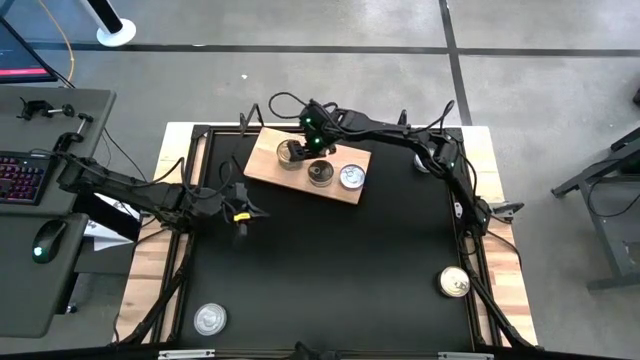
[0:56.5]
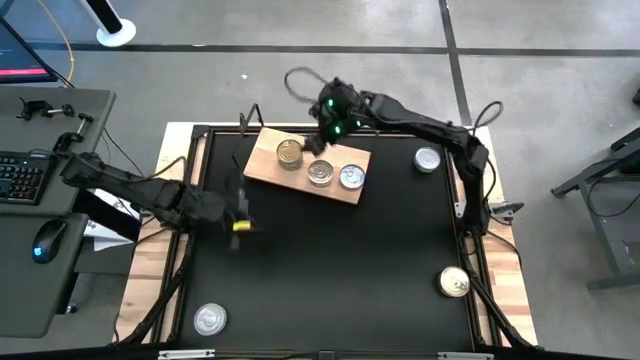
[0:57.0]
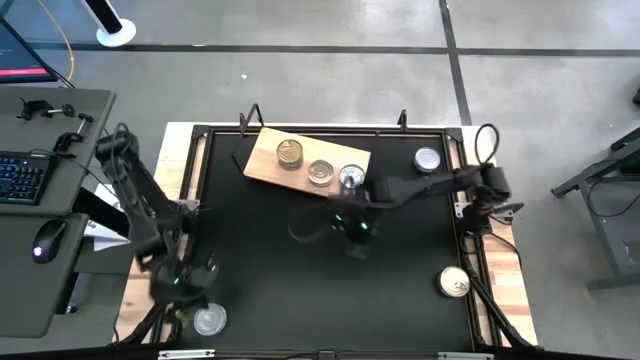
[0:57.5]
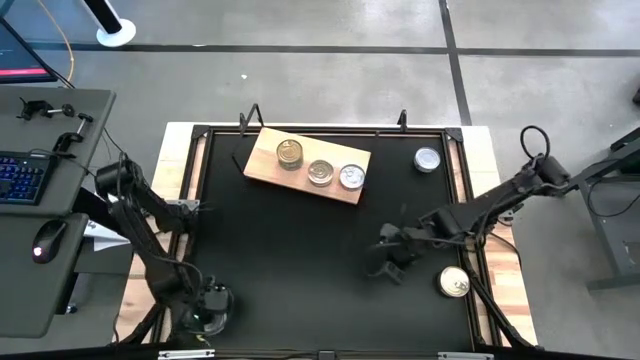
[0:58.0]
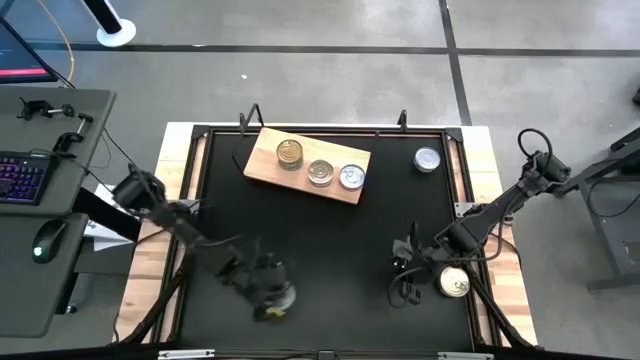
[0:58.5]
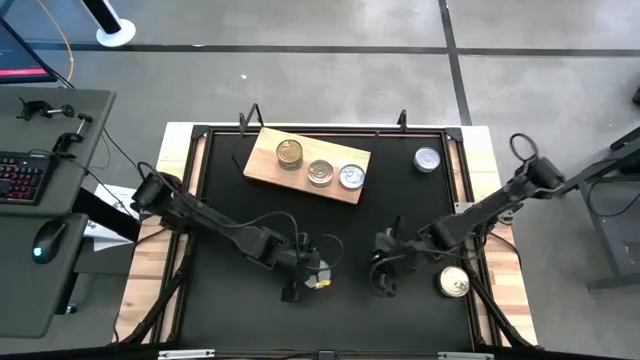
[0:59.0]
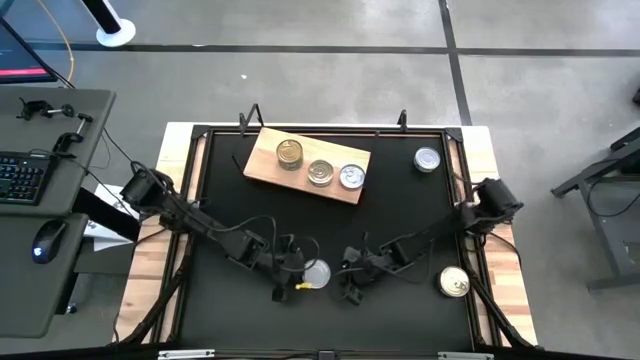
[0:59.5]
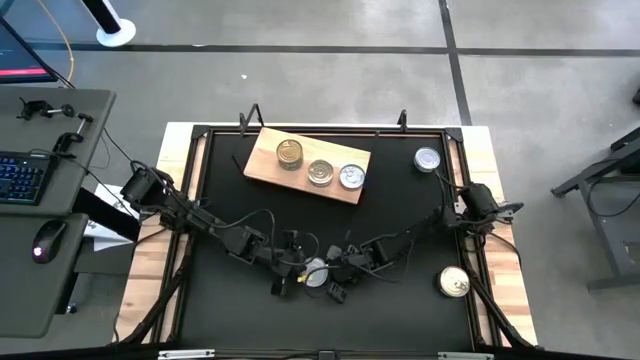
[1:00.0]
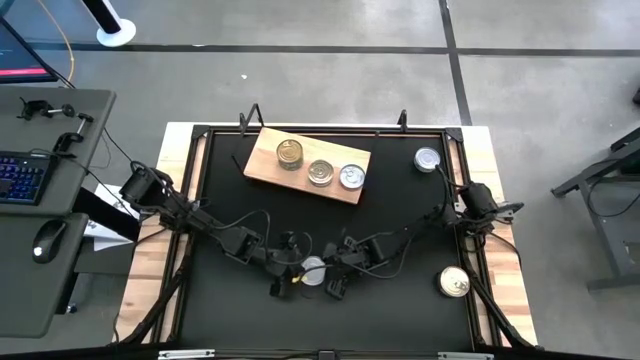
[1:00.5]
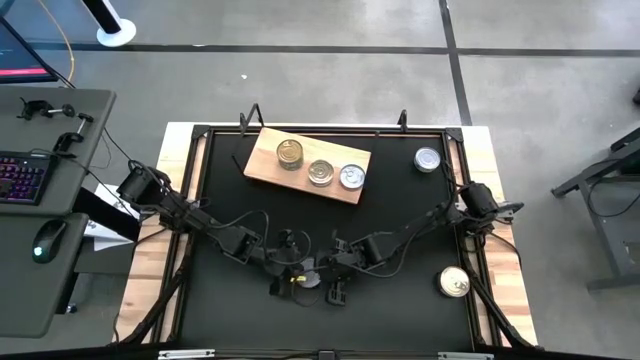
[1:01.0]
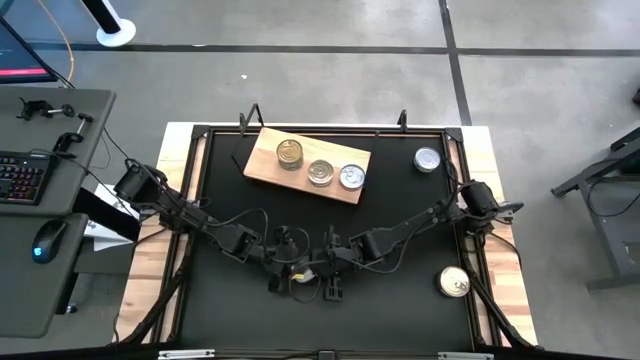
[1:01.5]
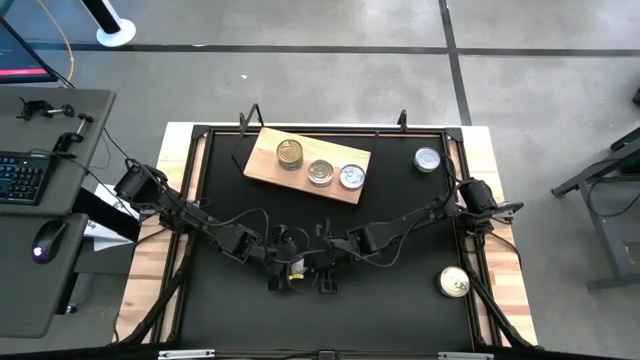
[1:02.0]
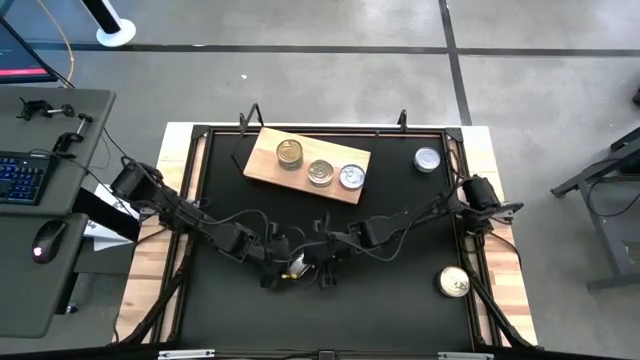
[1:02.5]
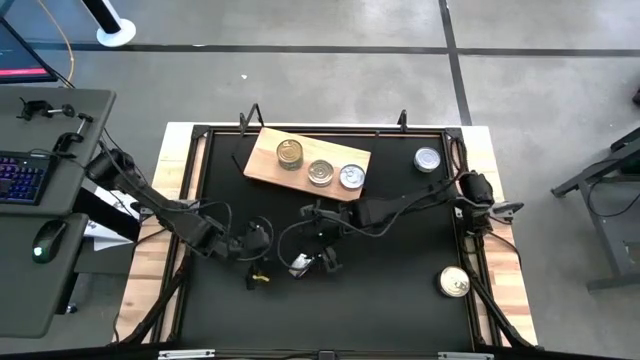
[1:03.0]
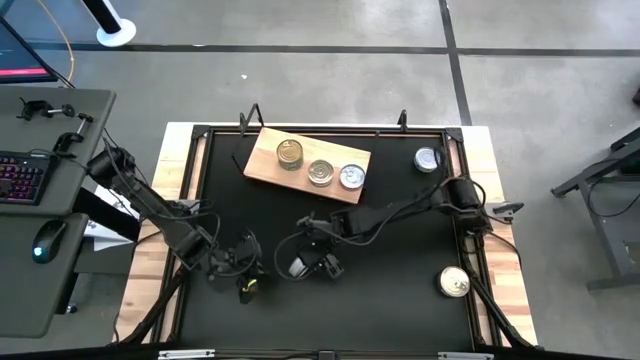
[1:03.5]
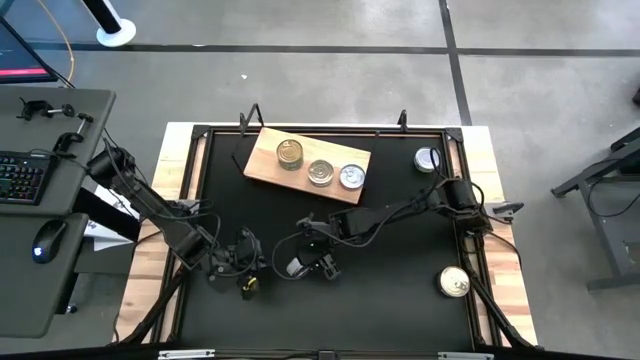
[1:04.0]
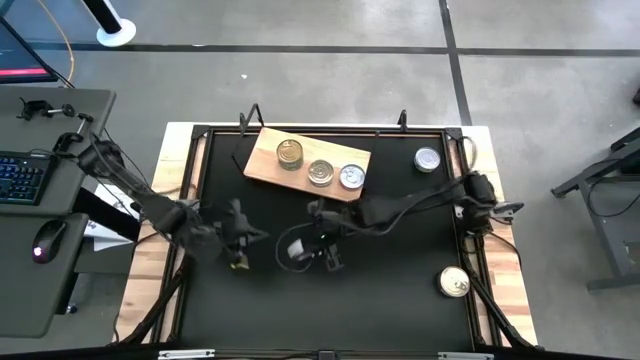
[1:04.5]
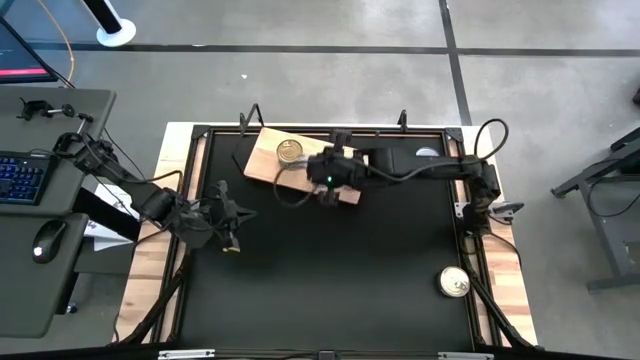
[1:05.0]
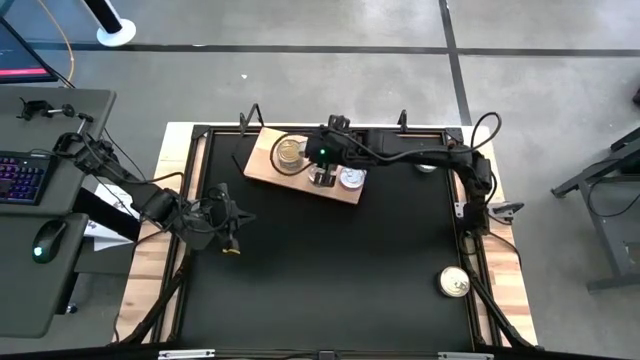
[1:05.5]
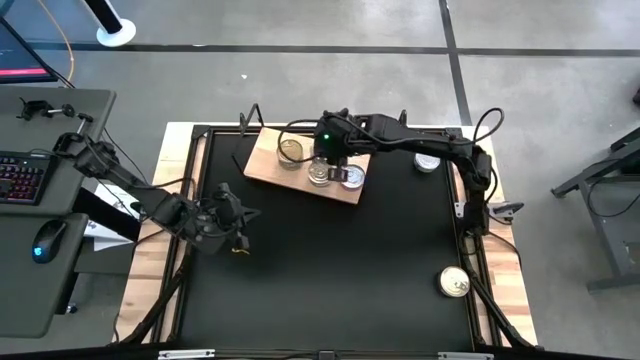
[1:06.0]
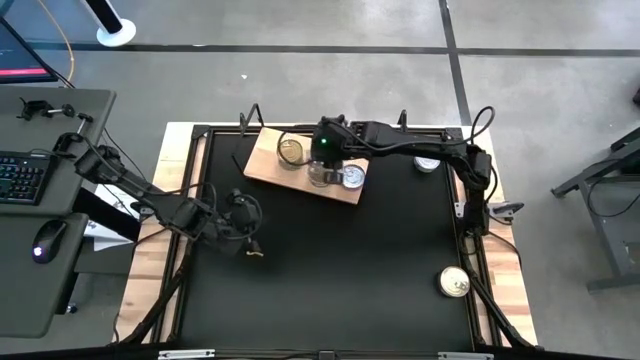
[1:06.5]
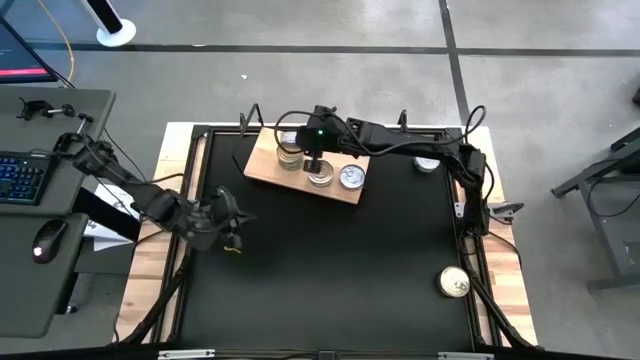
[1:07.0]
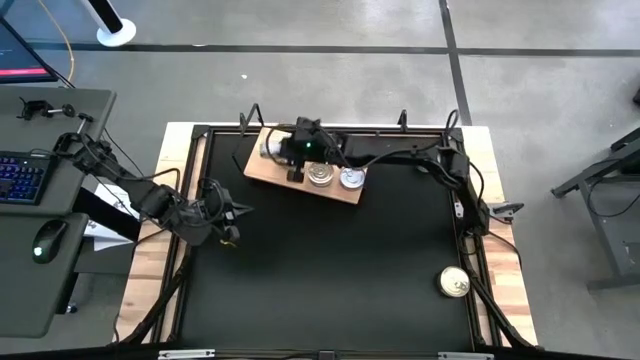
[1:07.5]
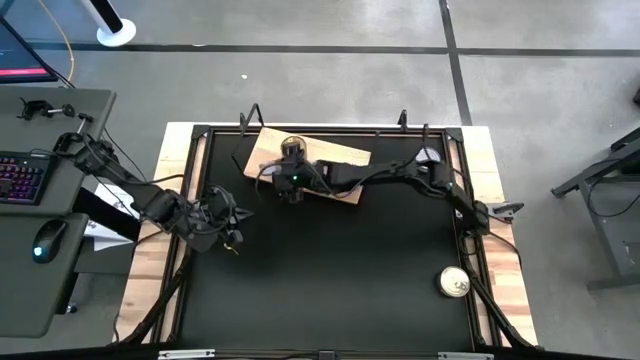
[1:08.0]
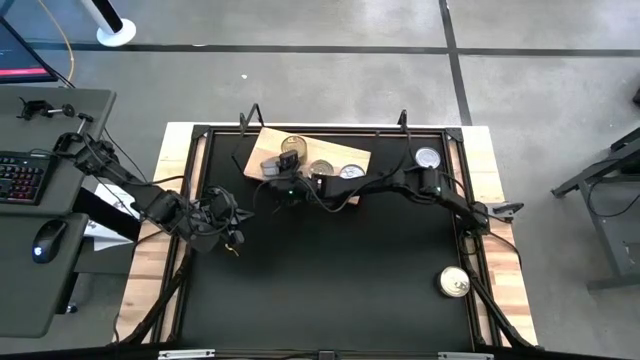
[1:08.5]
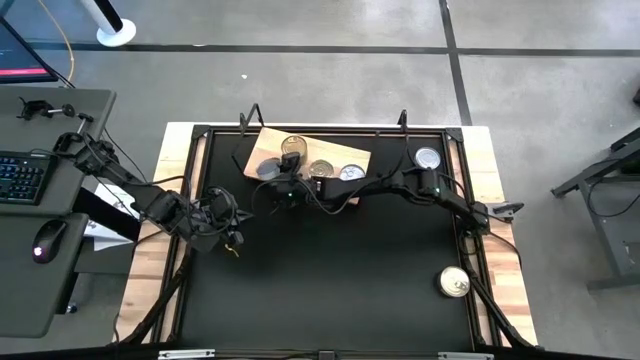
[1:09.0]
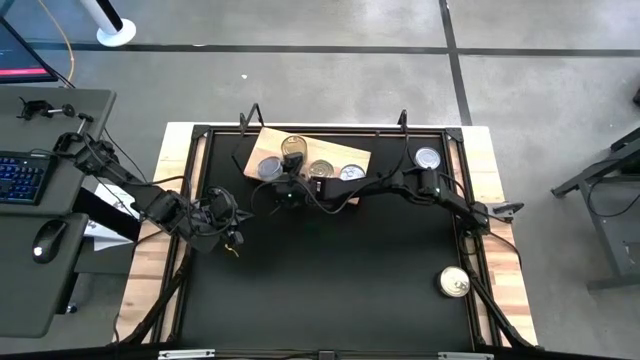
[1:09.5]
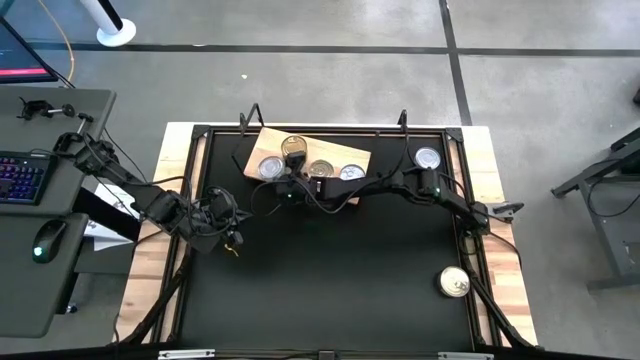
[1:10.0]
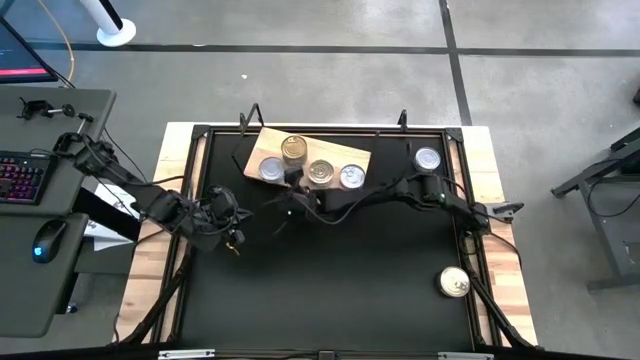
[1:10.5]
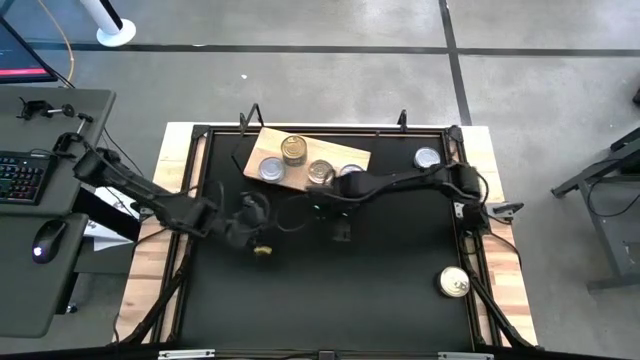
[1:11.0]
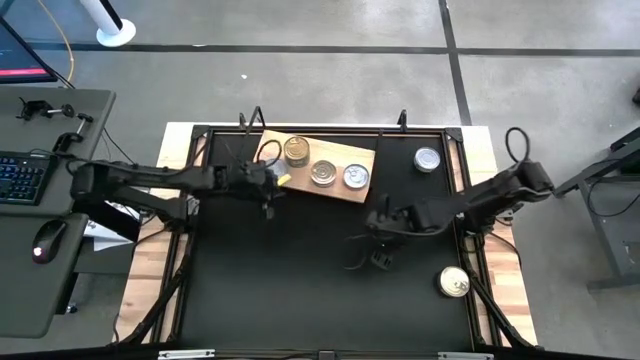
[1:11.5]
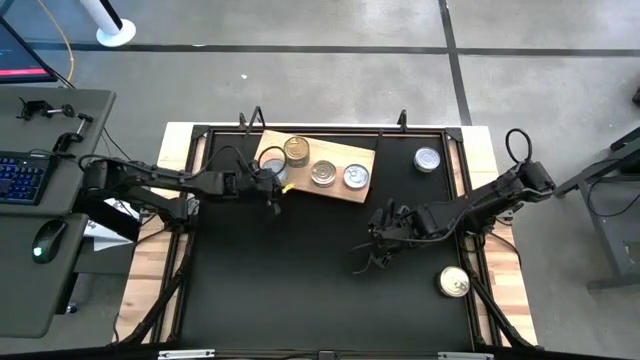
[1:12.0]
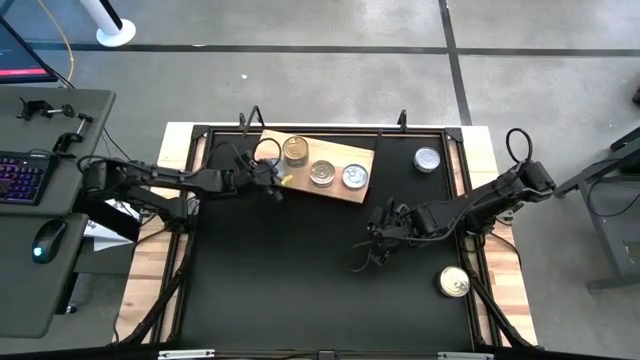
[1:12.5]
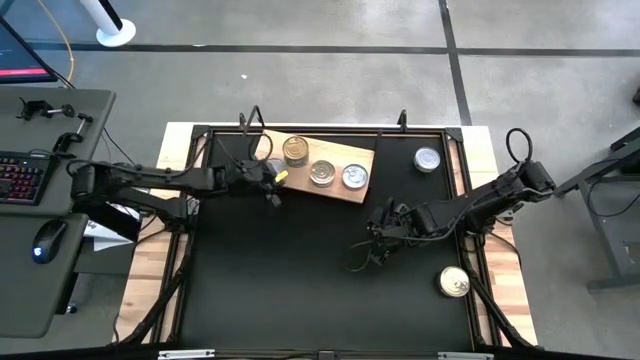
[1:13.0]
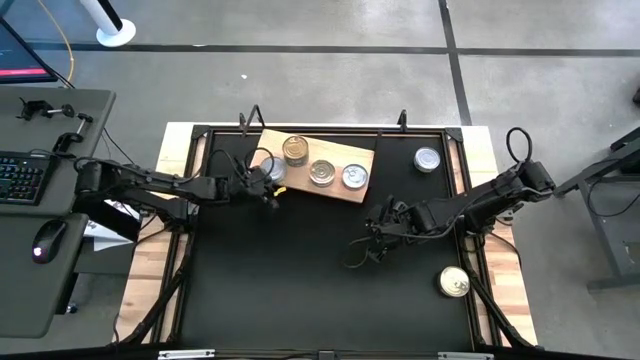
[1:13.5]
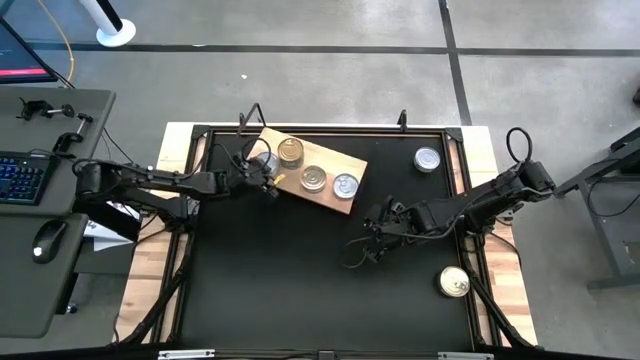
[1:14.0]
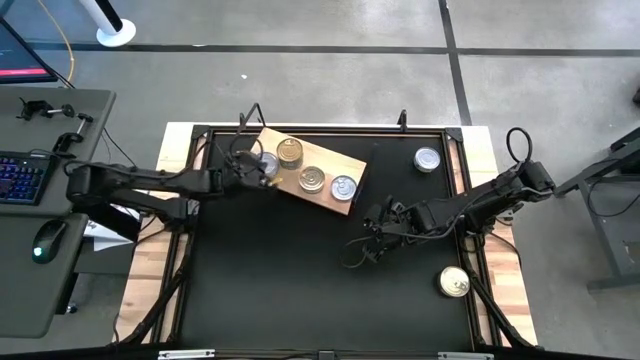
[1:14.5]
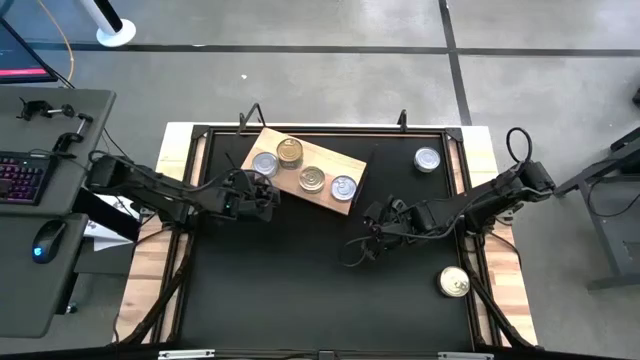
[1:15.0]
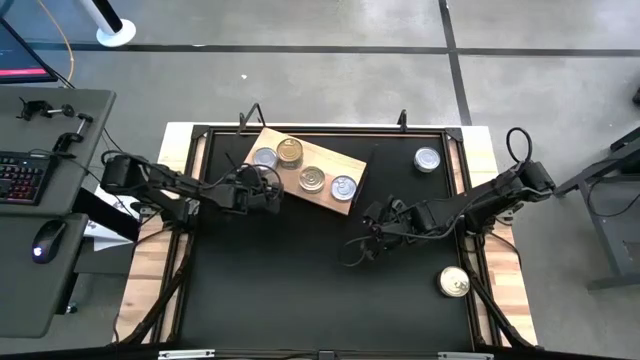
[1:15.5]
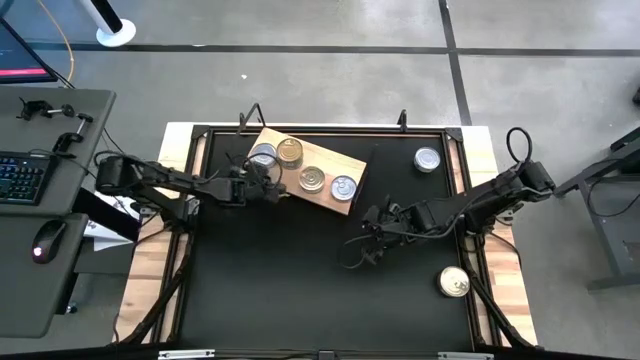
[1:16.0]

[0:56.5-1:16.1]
Task: Stack canned seafood by type on shelf
Put the bottom green tuna can on the shelf

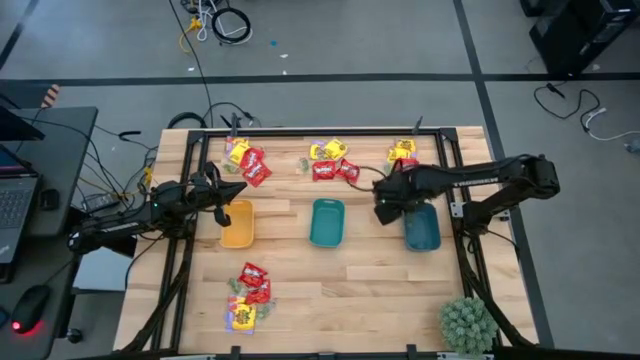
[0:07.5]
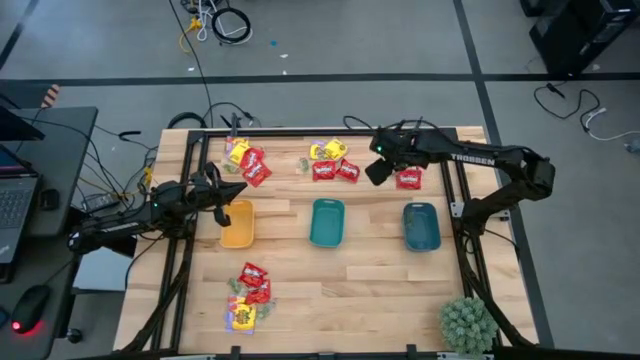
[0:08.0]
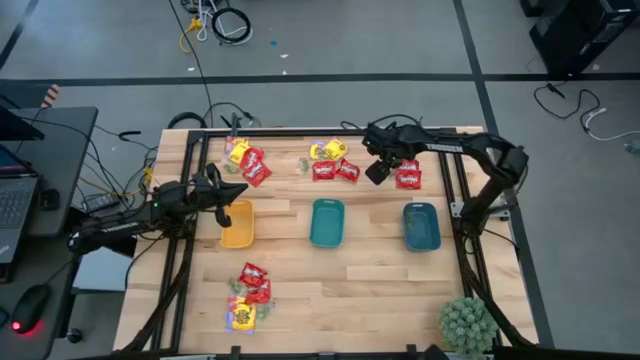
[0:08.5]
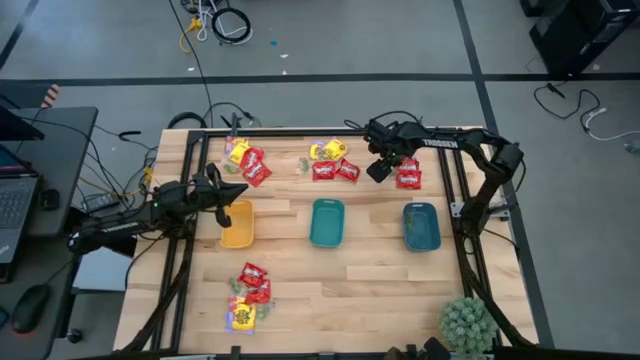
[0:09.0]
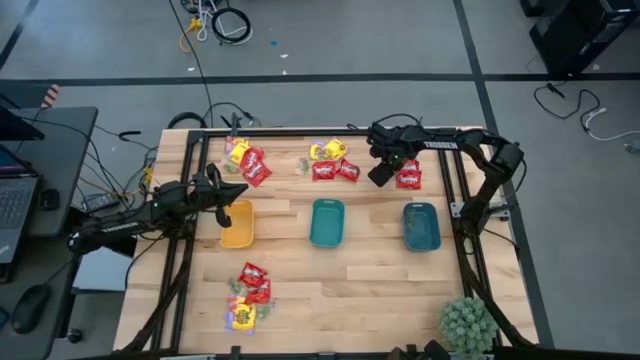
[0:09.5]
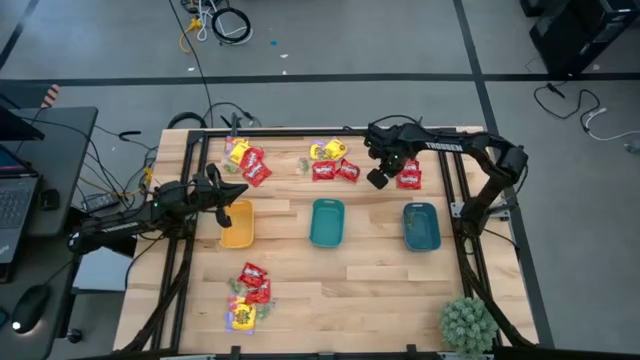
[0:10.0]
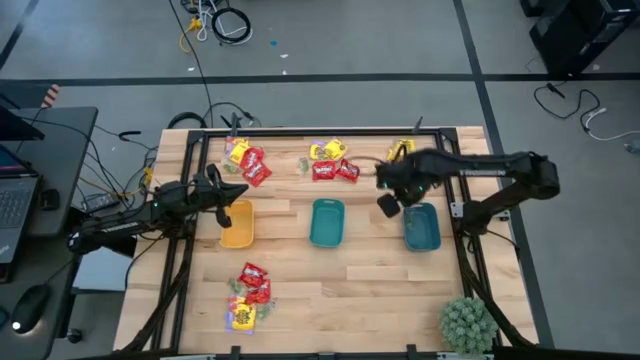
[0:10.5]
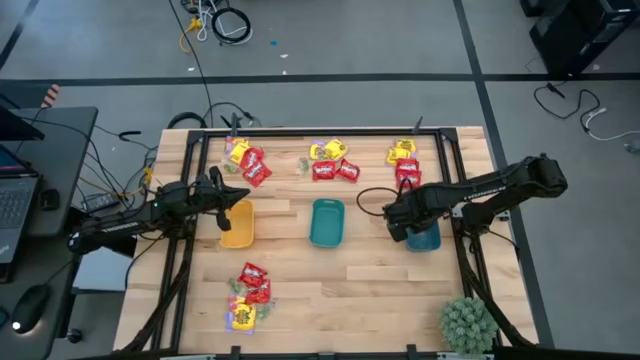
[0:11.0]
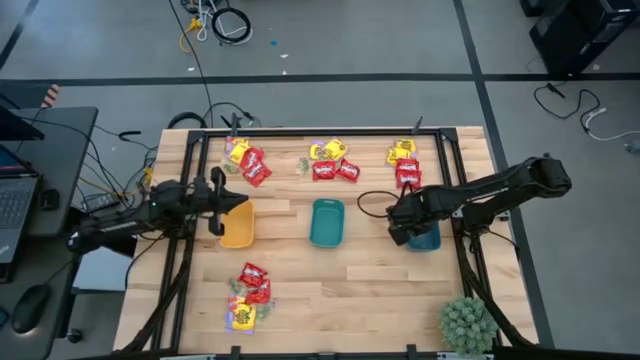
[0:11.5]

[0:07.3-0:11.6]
Task: Sort candy
Put the green transparent candy into the blue bin
